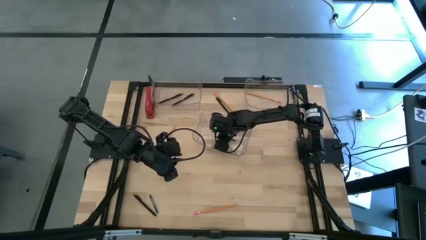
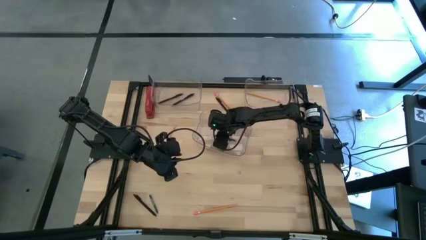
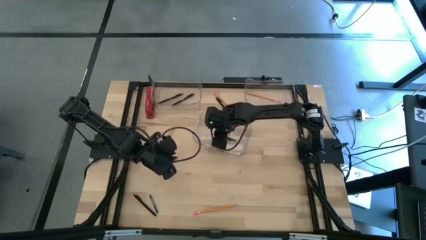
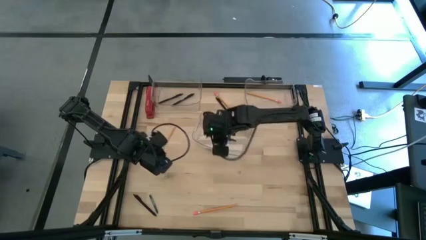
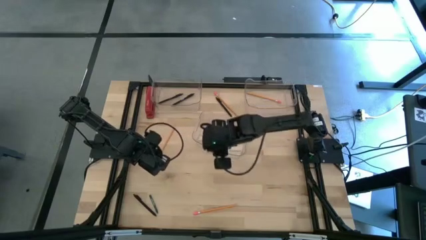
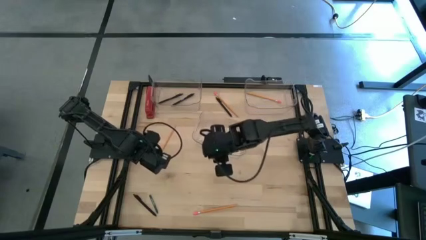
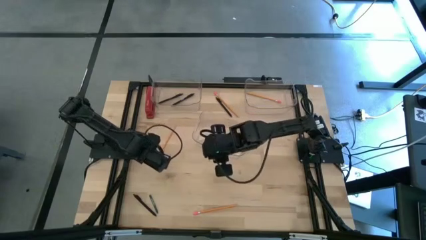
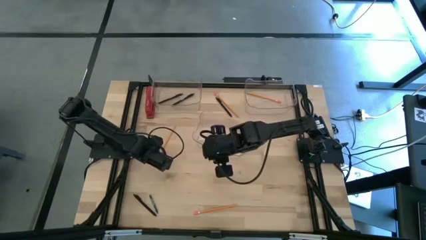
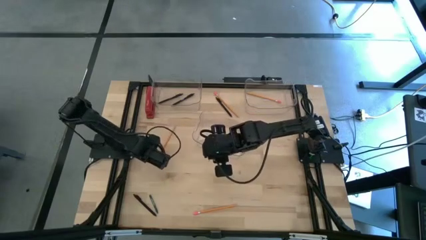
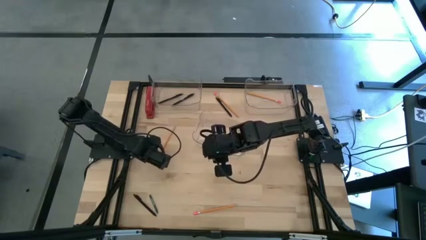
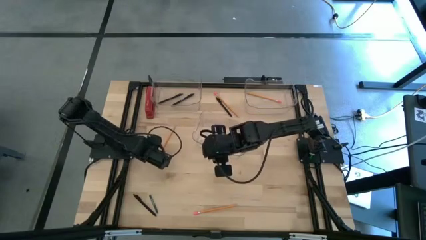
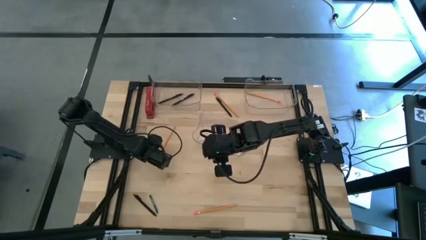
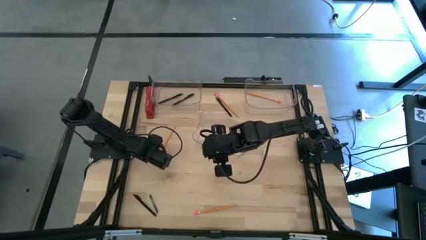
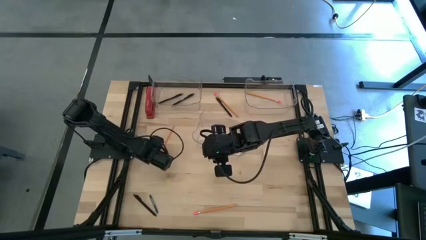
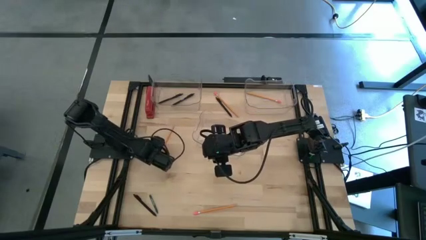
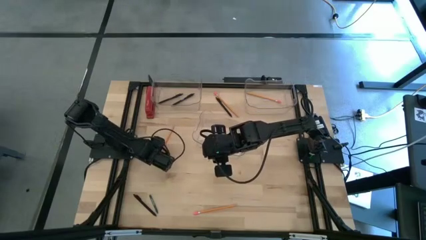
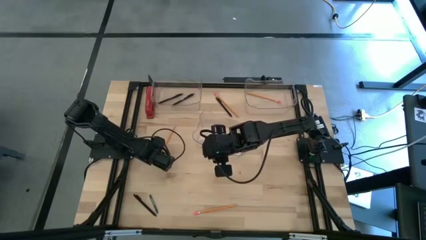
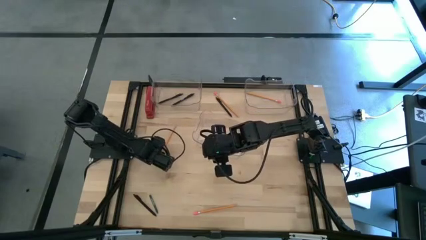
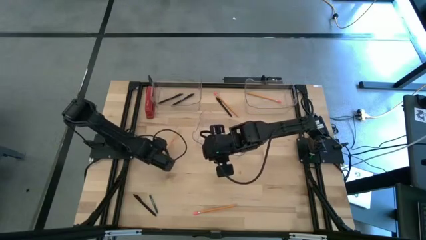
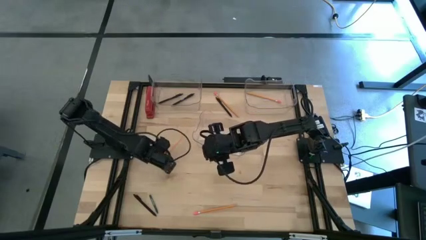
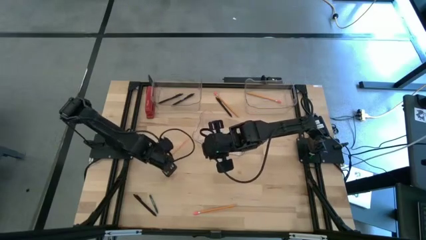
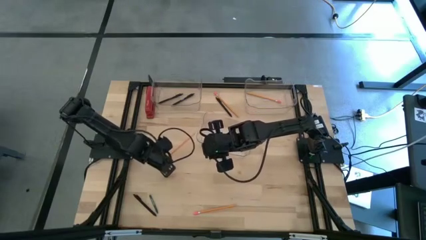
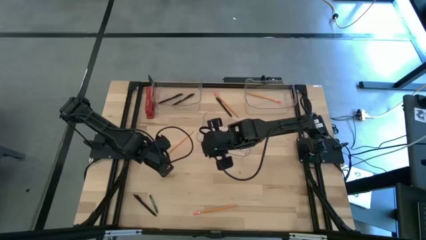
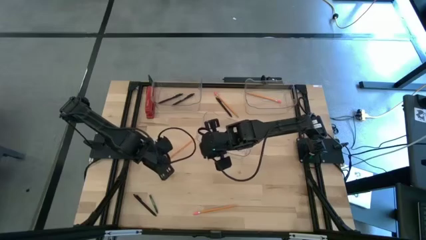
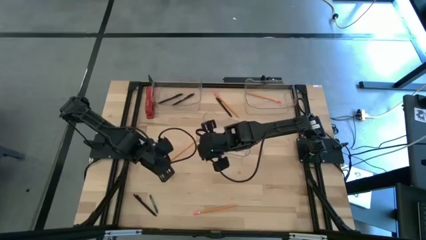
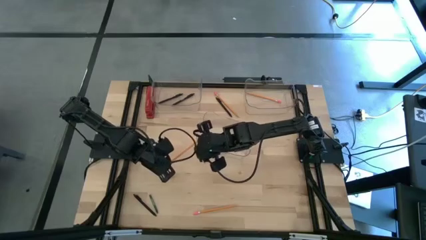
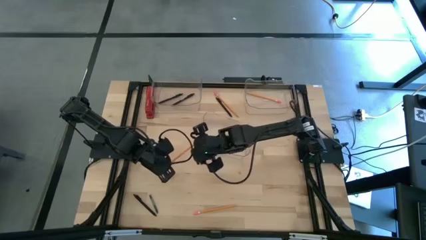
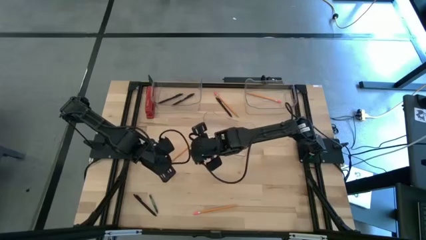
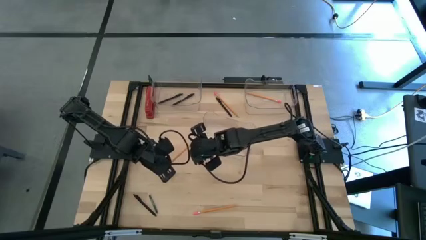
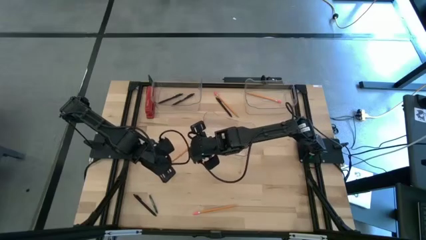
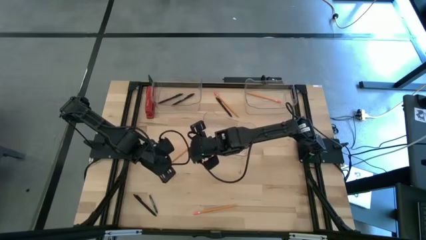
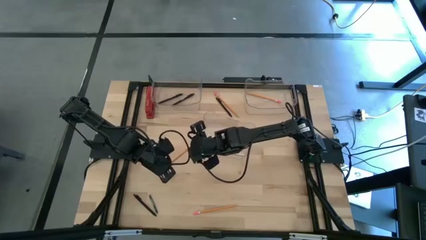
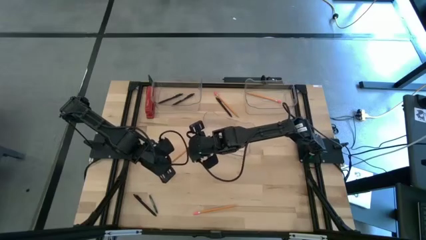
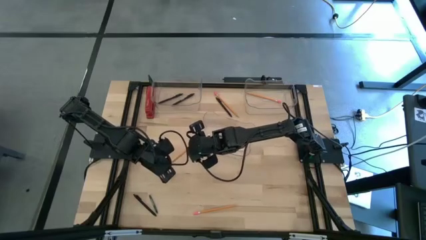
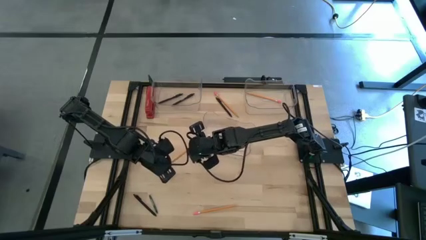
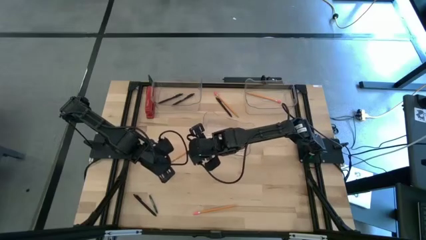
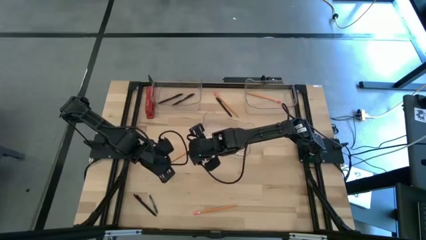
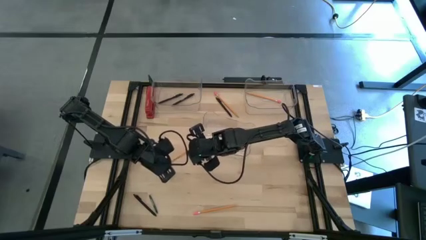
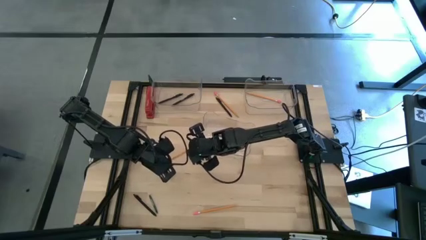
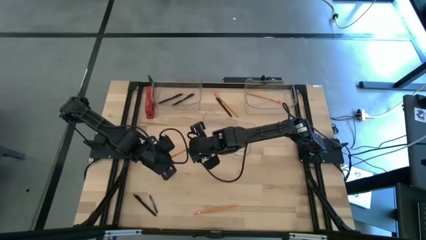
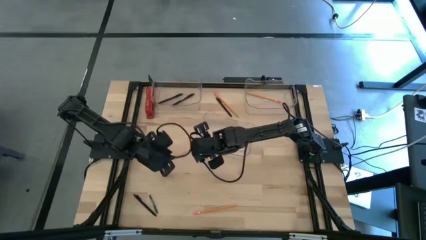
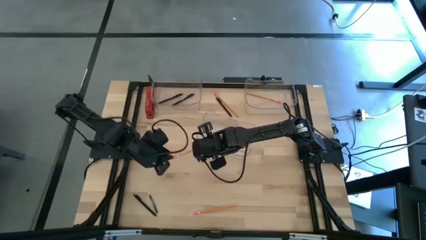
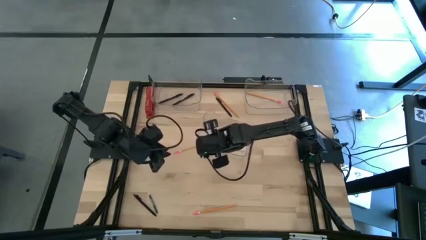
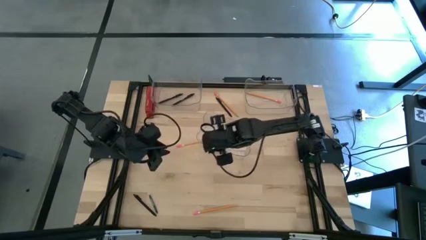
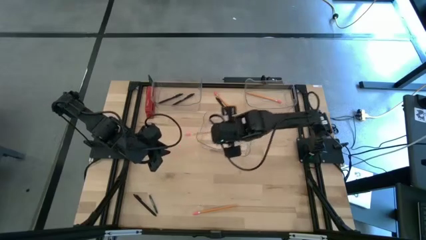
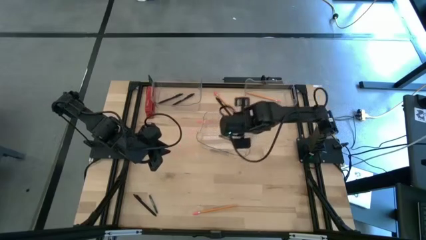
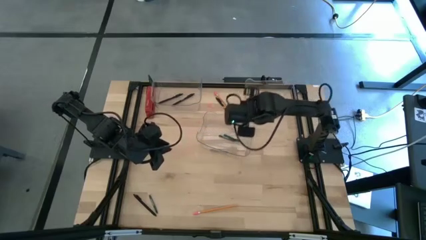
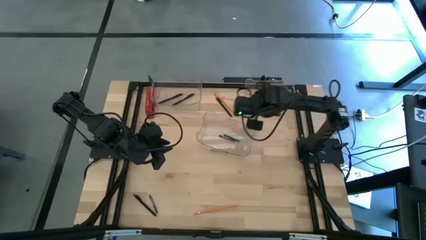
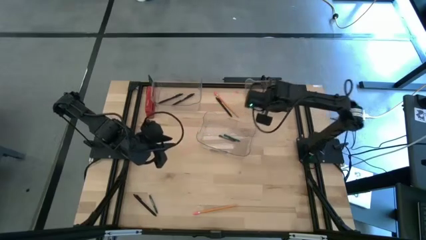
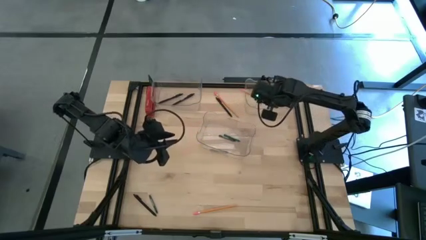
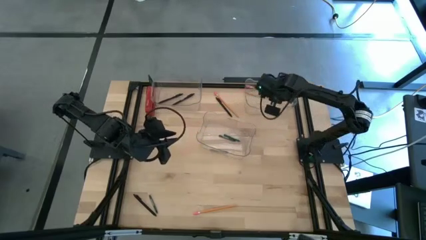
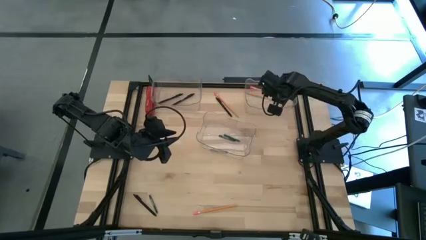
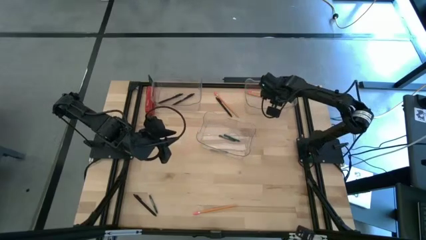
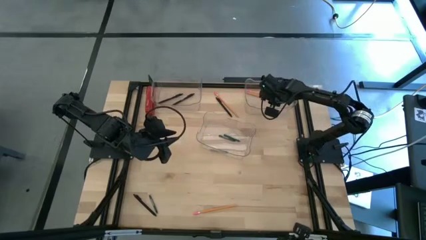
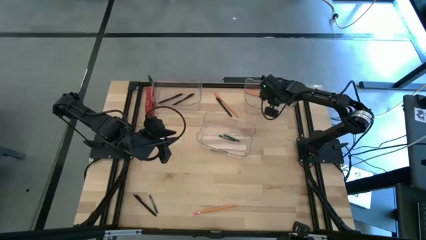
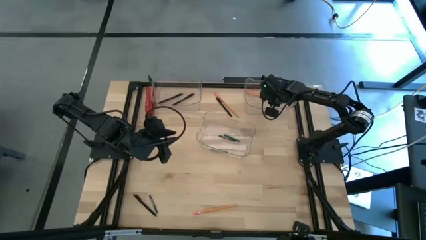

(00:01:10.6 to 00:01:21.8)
Task: Sort crayons/erasers/pens/pencils in bins
Put the orange pencil into the top right transparent bin

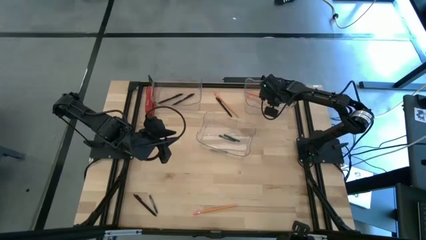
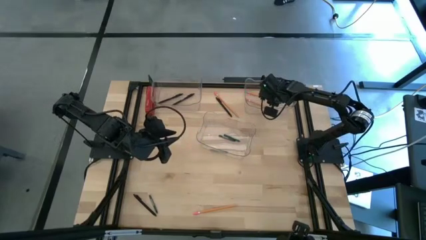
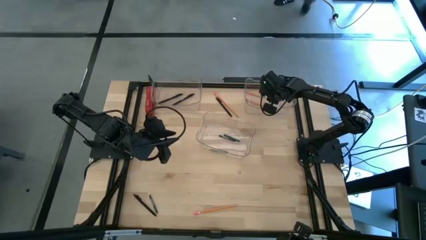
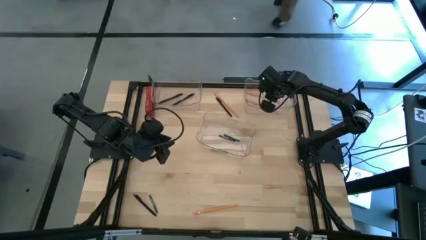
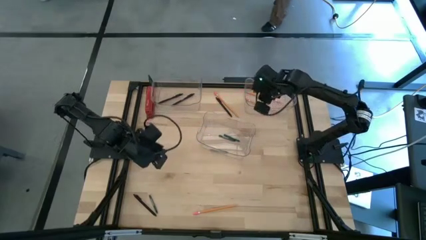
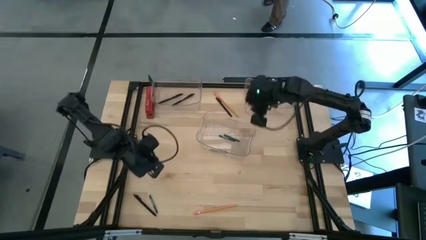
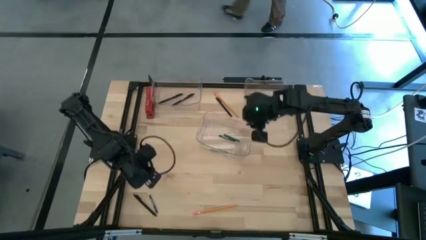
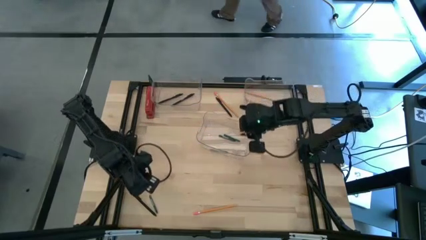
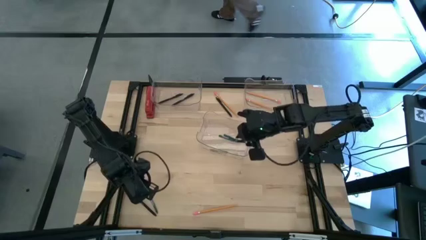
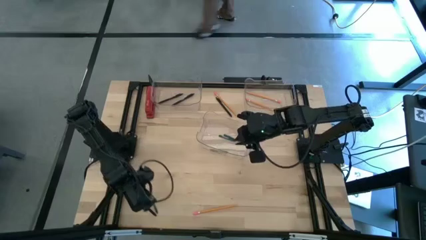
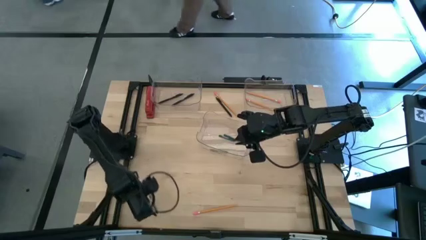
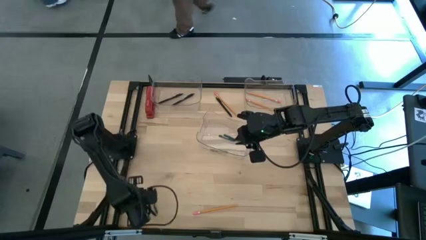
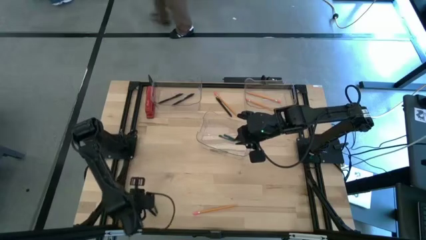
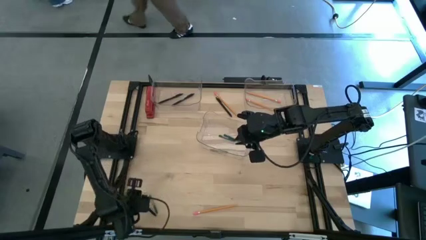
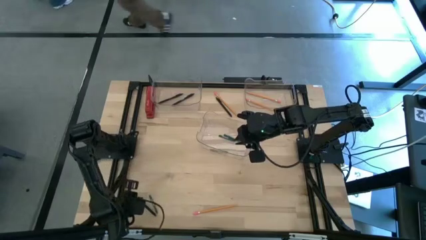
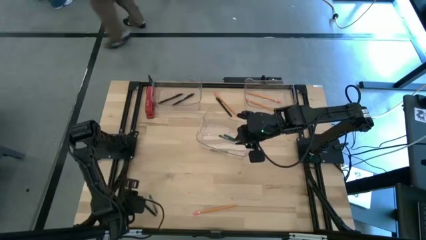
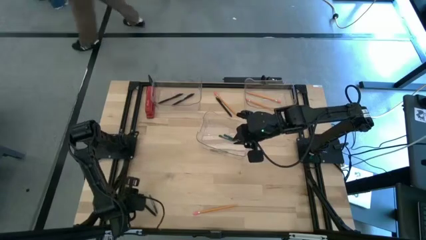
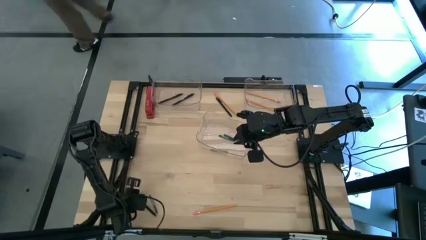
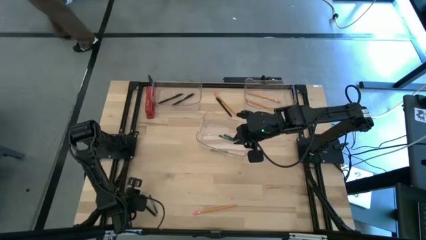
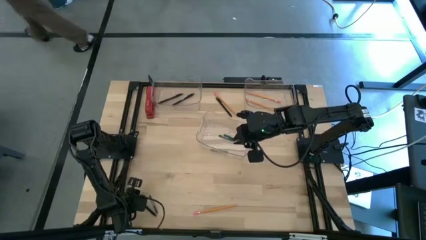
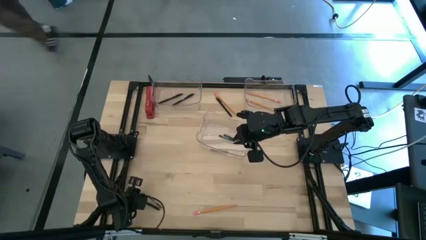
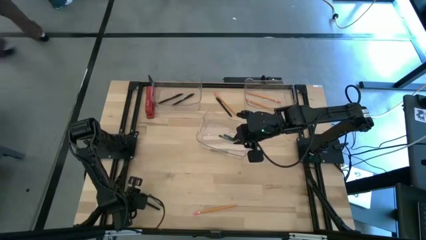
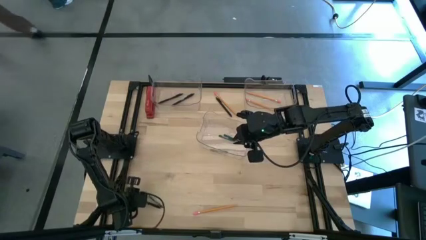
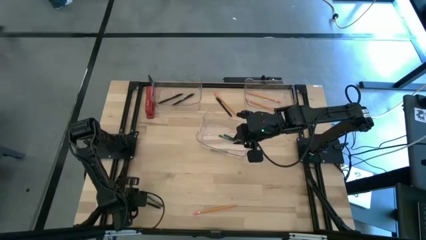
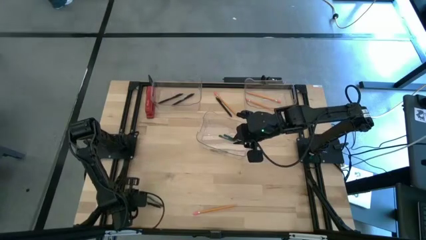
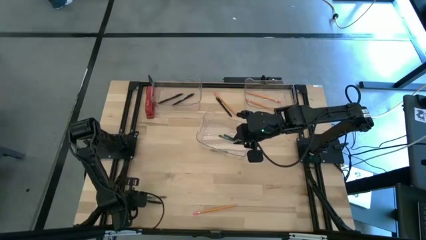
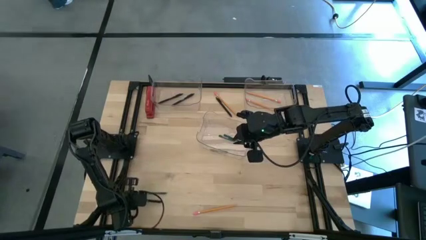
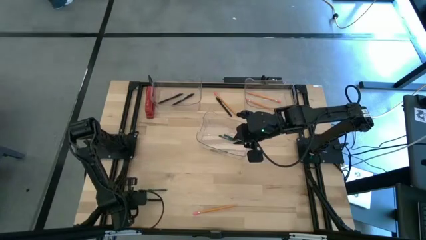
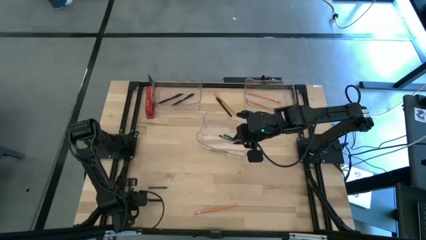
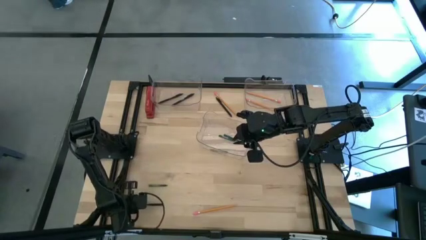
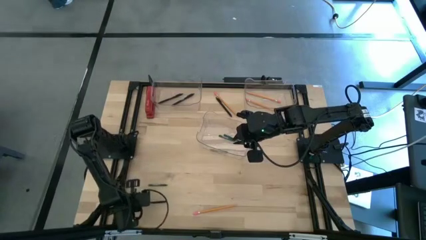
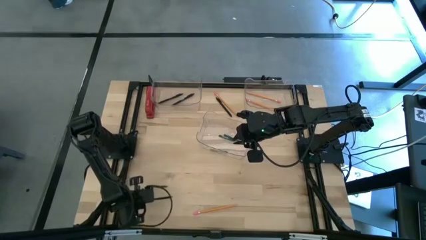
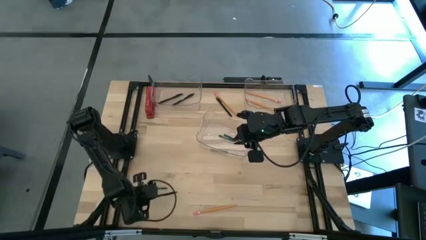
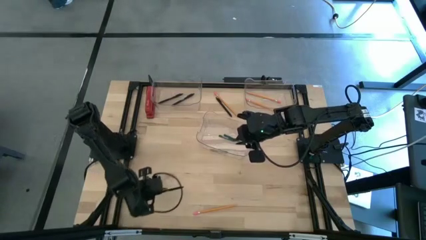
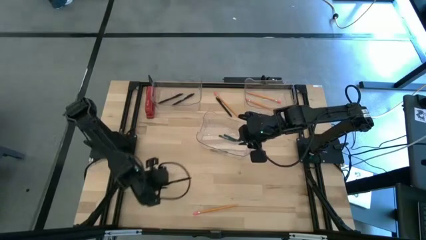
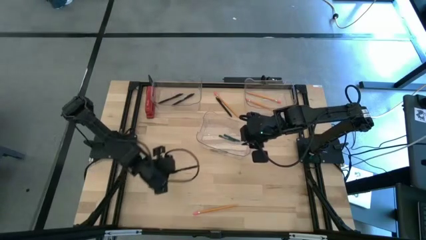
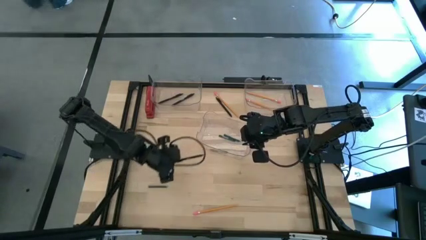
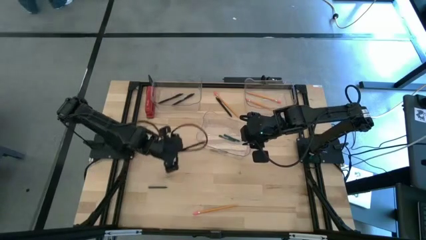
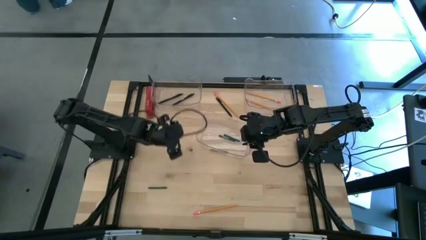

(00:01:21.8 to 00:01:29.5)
Put the bottom black pen into the top left transparent bin
